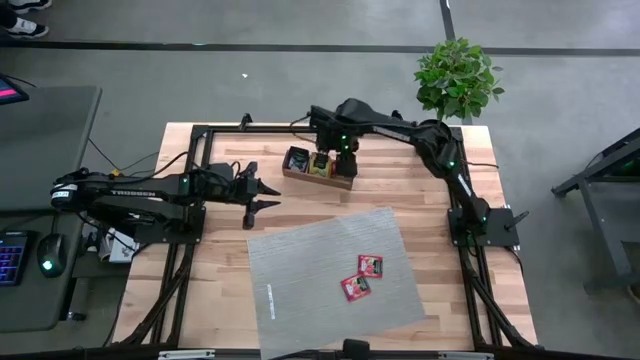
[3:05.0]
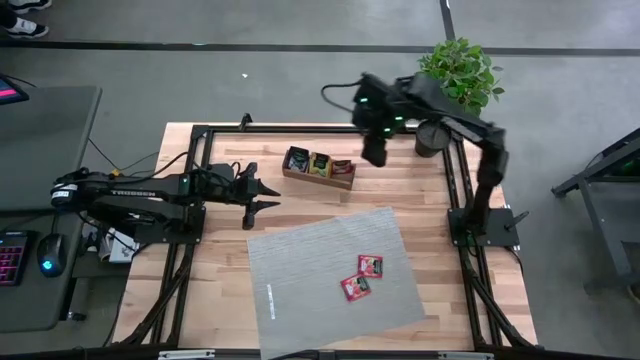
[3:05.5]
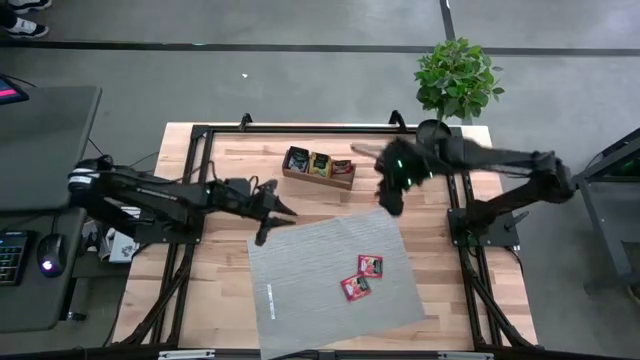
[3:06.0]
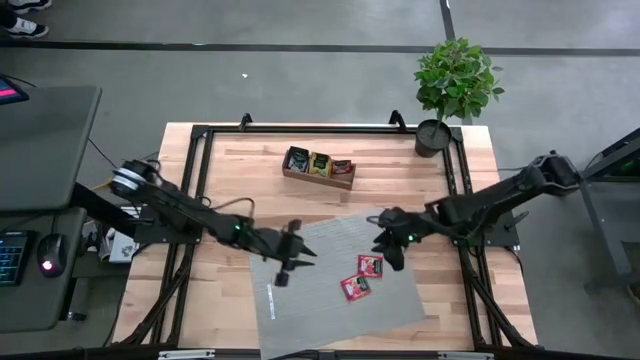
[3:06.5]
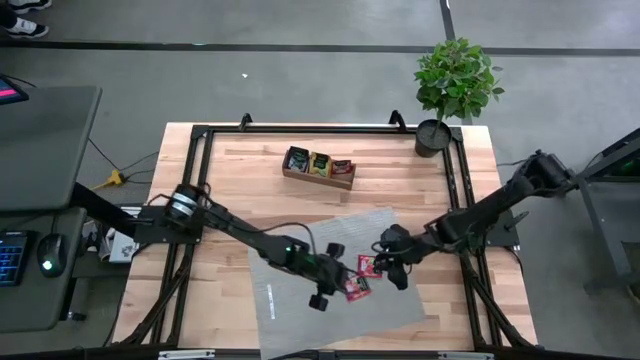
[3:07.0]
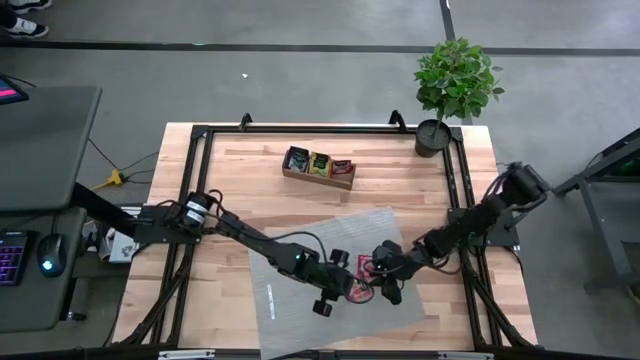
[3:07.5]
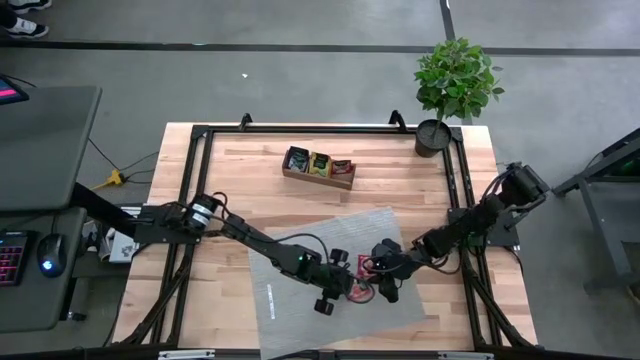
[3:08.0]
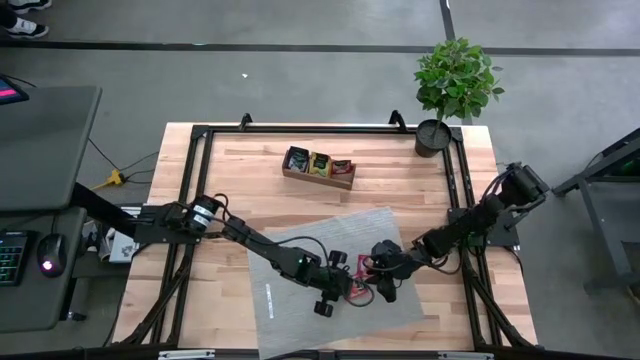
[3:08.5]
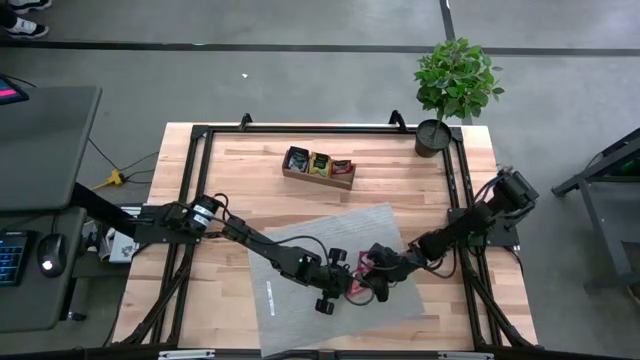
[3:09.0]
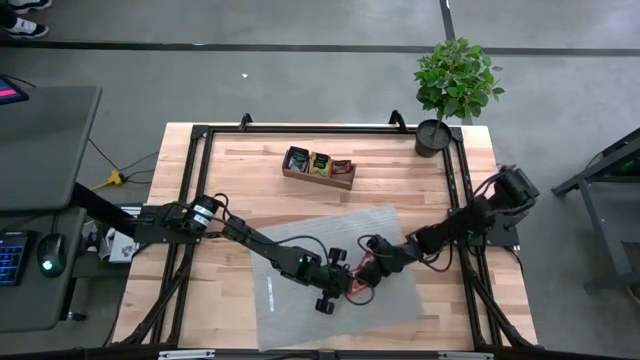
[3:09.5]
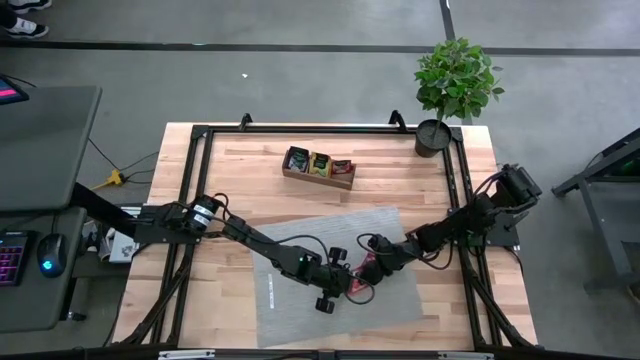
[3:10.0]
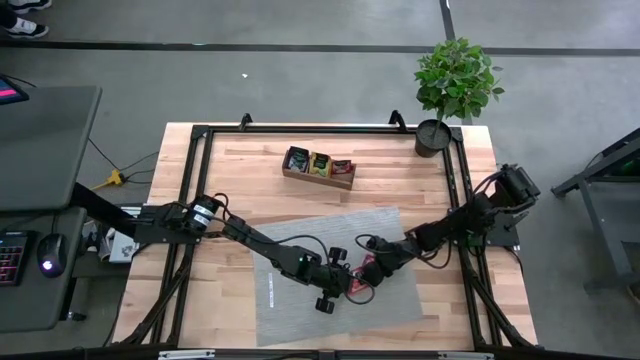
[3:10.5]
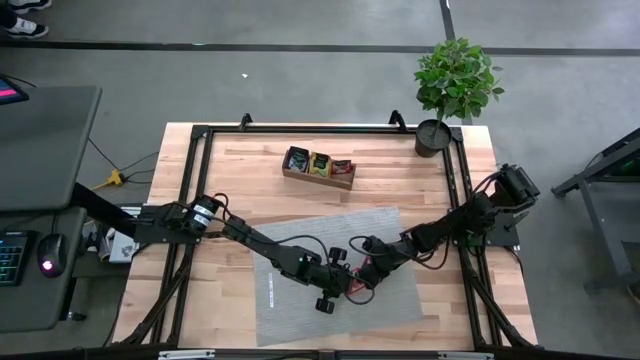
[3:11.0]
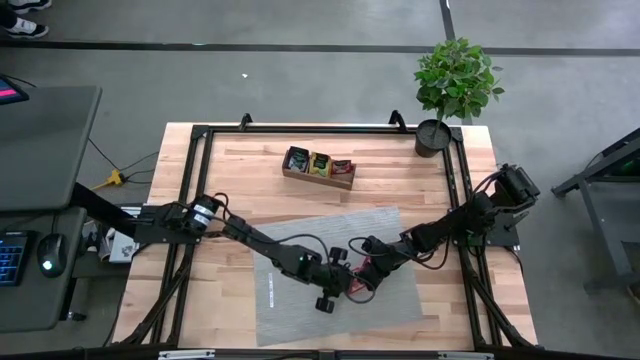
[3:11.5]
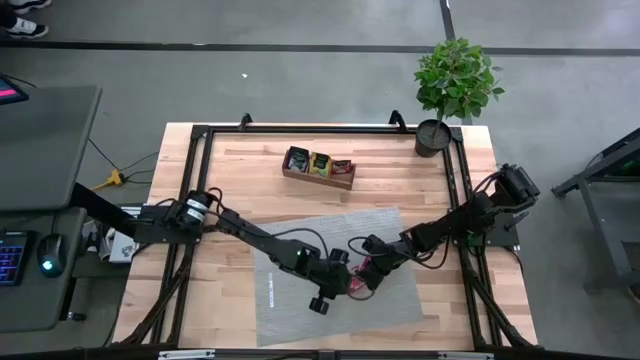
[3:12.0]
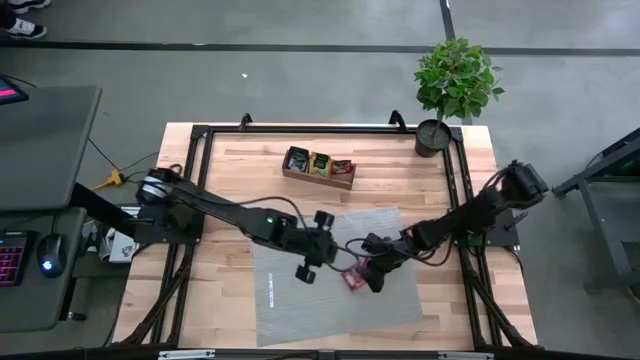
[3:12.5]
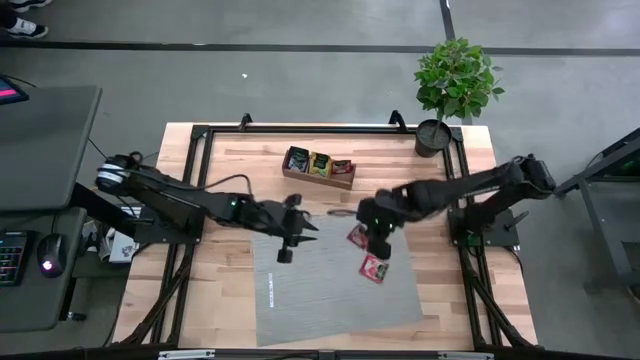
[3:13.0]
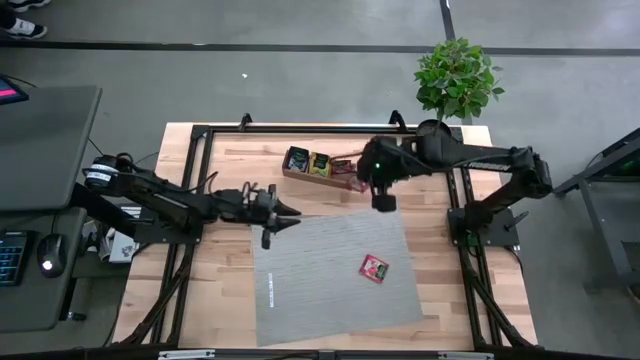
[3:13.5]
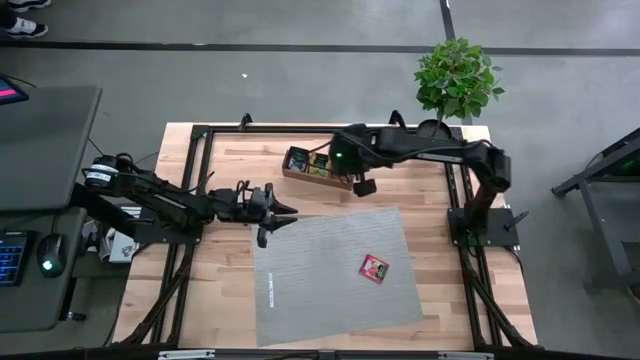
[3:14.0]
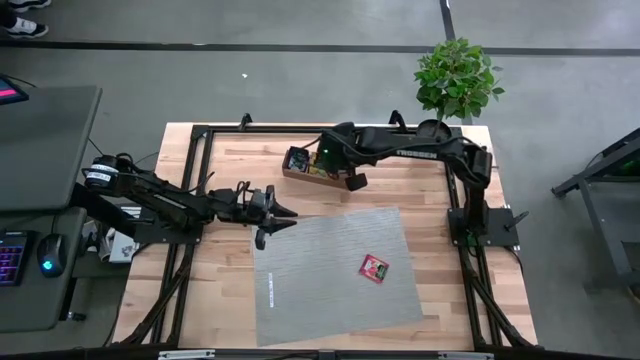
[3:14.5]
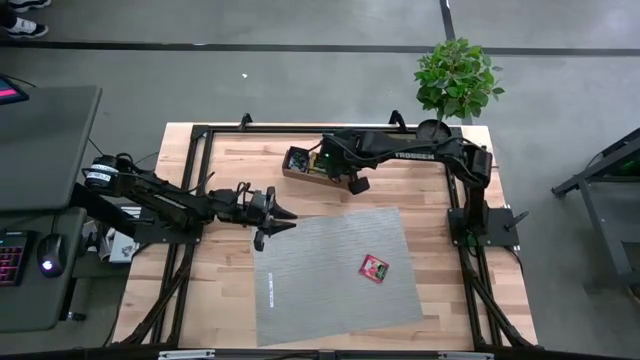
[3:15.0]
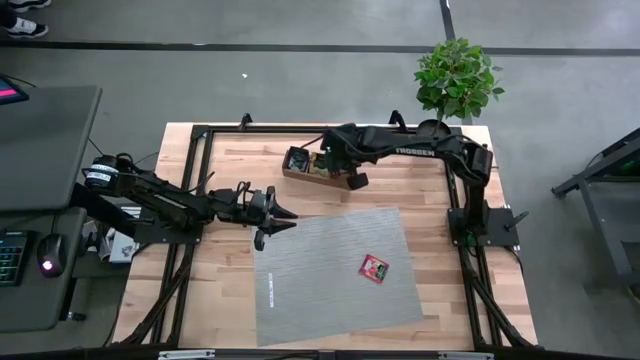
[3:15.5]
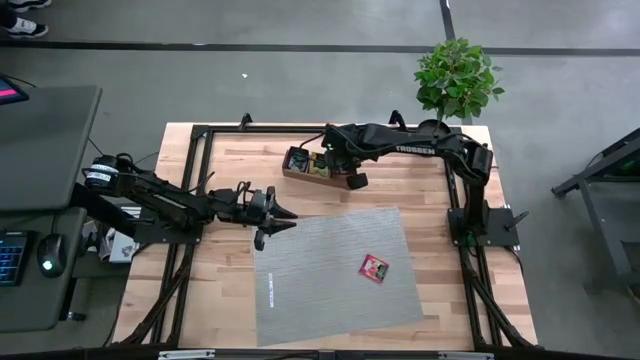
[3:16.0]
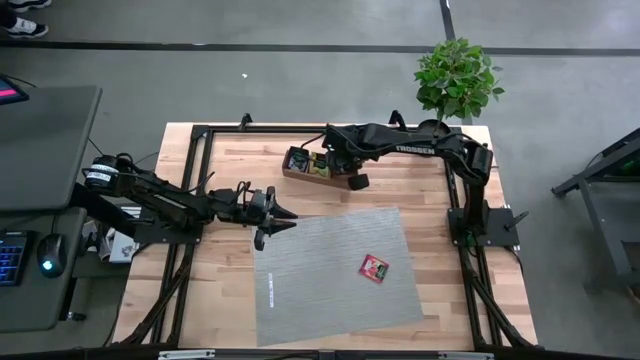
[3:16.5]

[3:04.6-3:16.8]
Task: Pick & Place Tea
Put the red tea bag into the right section of the wooden organizer

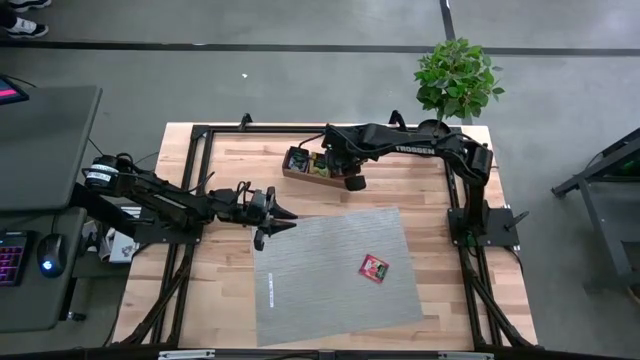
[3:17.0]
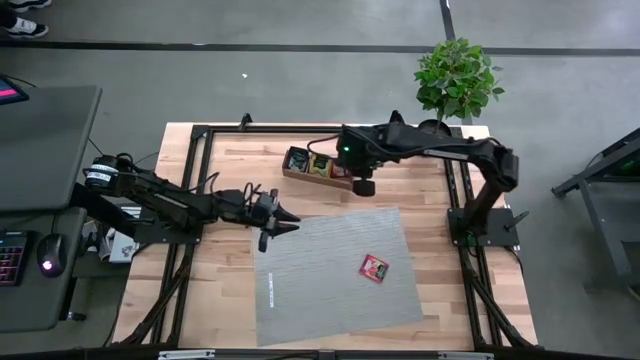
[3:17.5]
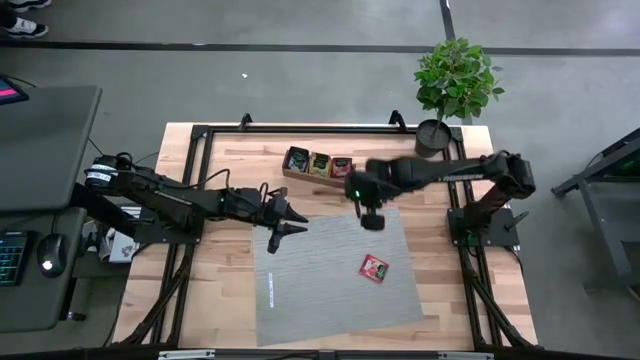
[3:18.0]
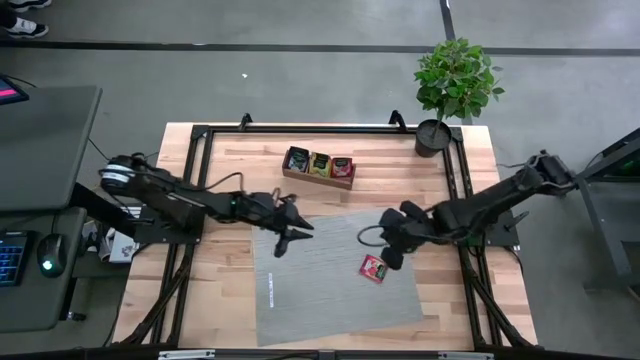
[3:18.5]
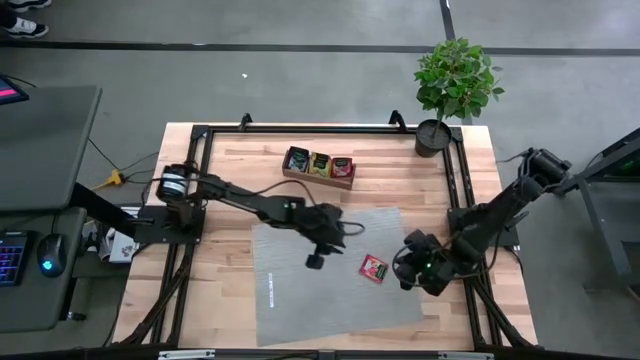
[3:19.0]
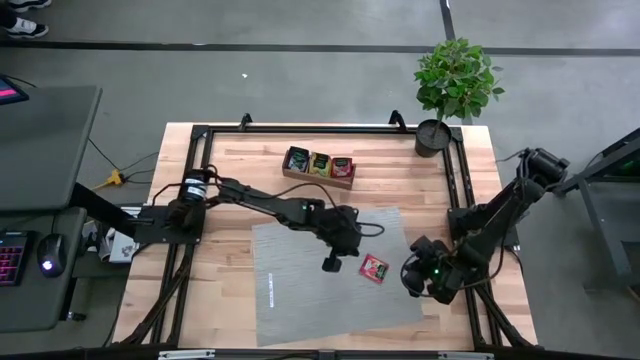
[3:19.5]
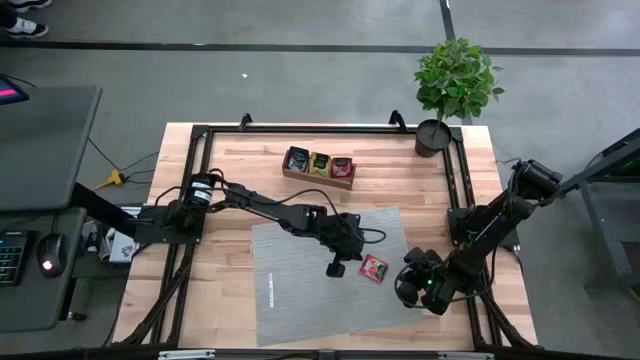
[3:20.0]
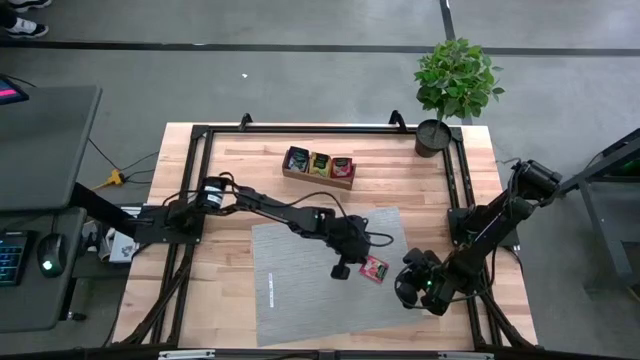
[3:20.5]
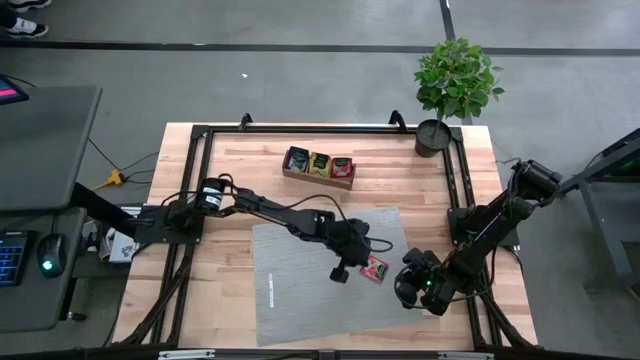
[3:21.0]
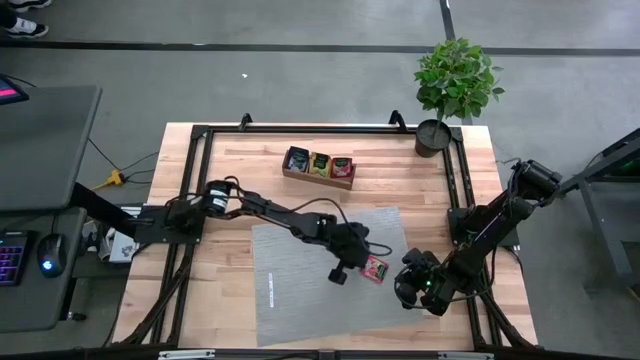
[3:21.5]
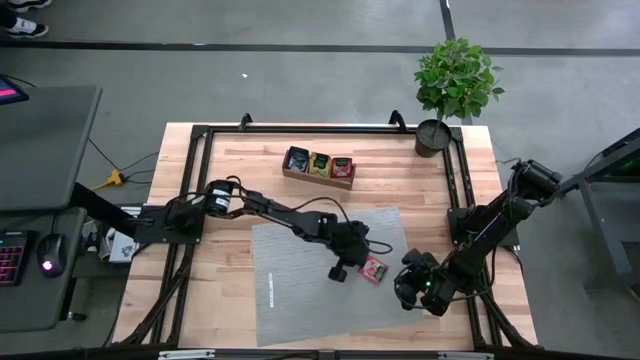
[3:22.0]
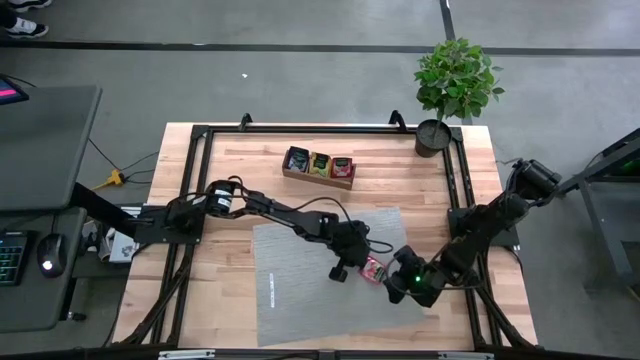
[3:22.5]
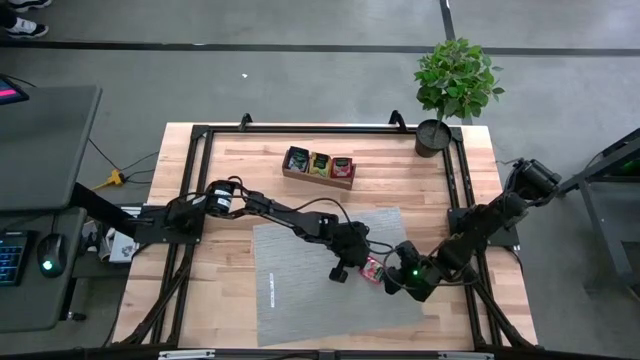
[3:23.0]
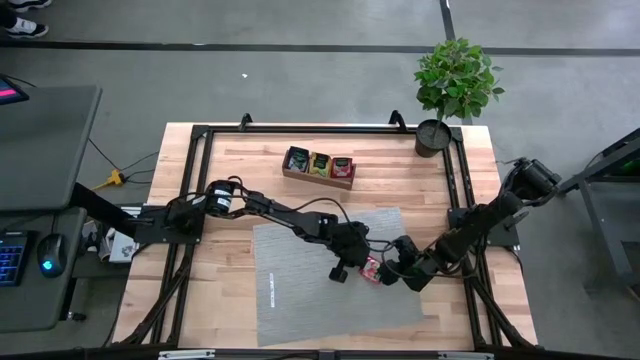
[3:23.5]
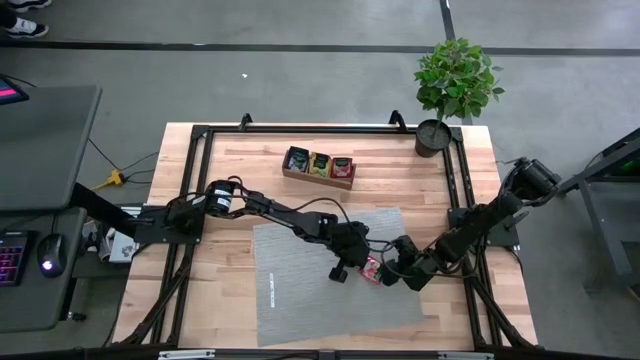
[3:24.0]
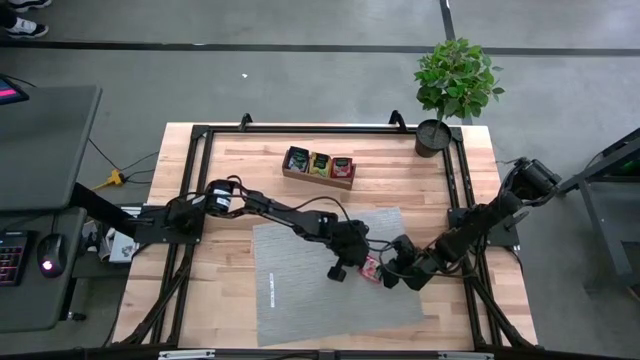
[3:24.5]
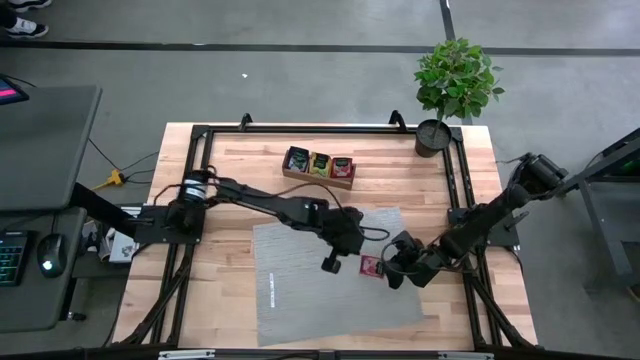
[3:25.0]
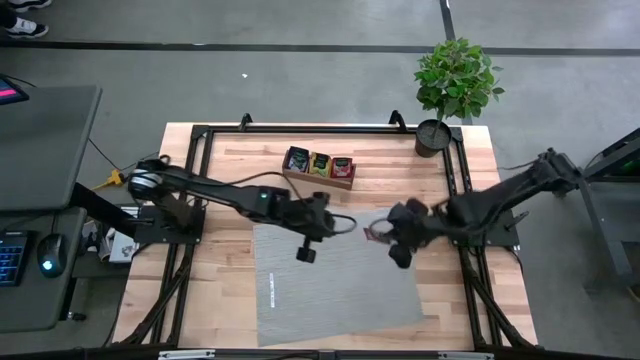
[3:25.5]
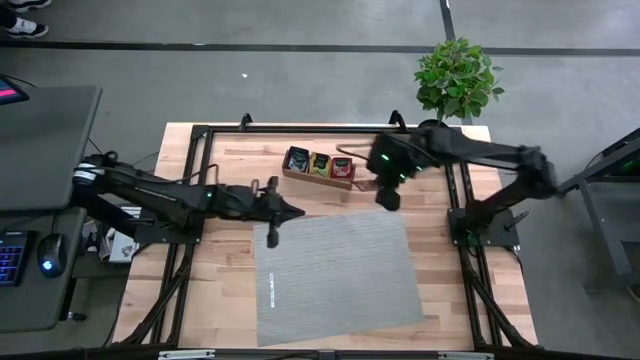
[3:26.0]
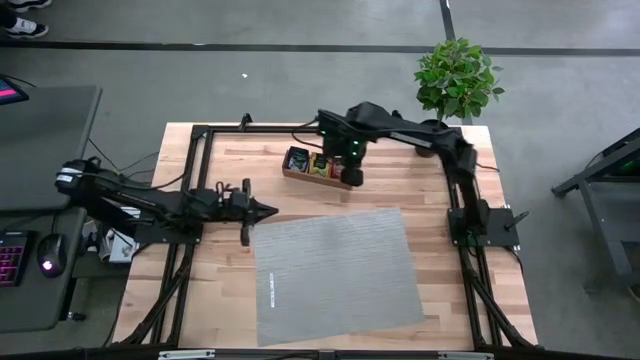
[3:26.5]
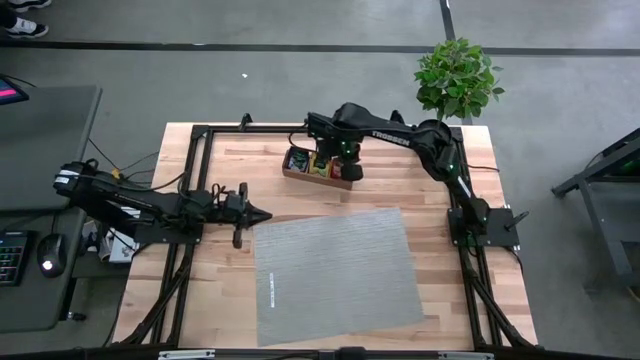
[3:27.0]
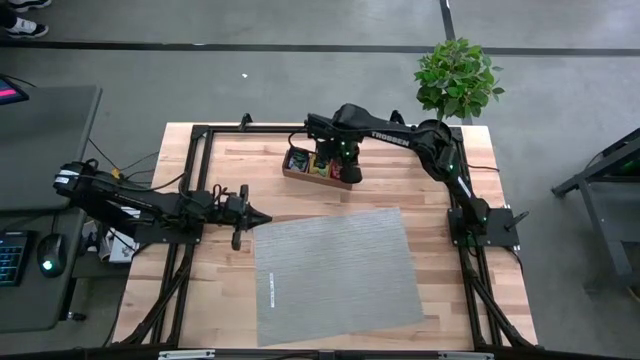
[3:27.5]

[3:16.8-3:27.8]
Put the red tea bag into the right section of the wooden organizer
